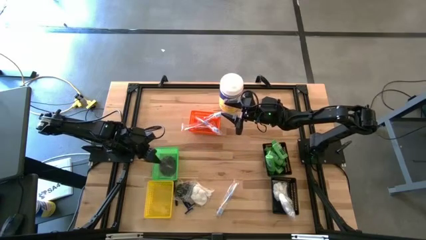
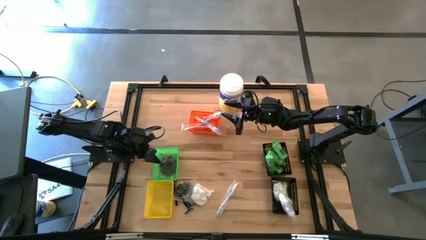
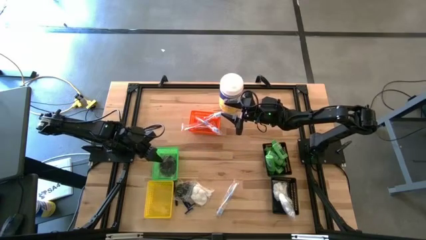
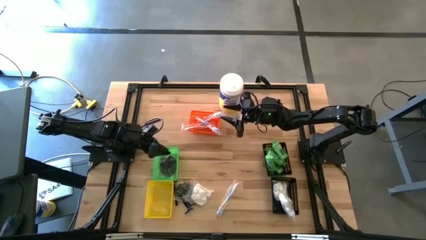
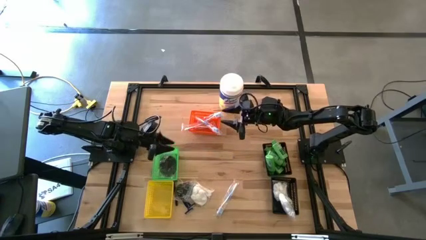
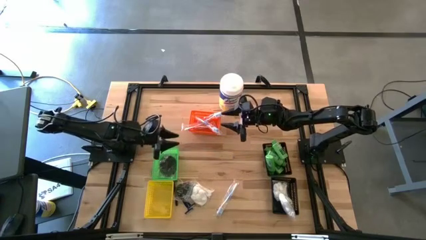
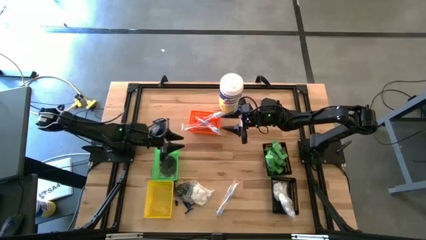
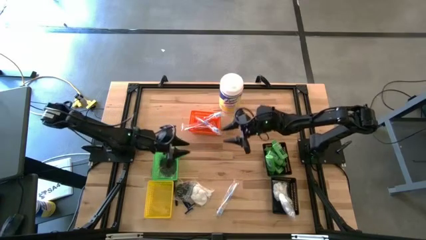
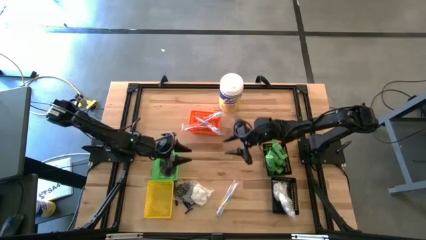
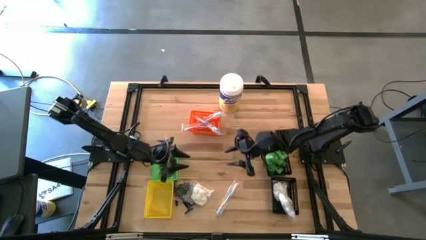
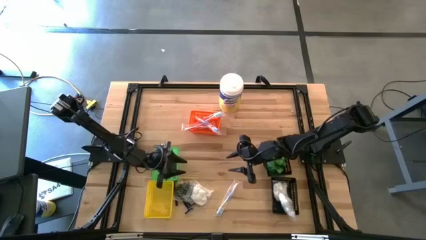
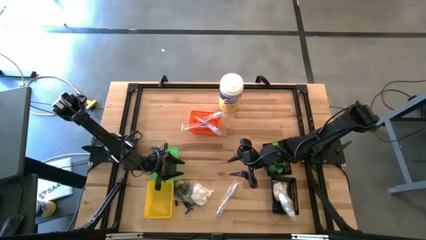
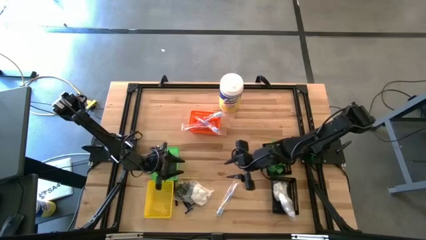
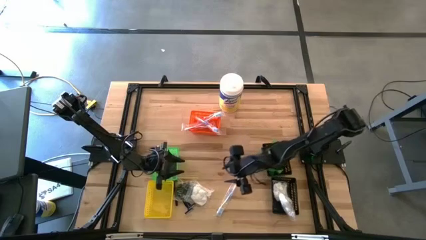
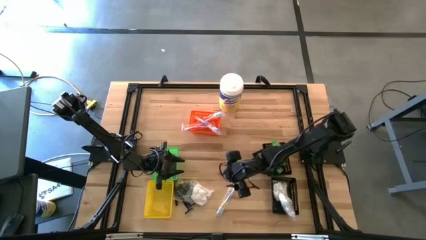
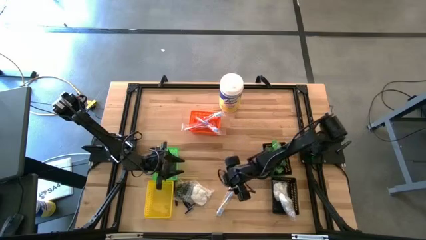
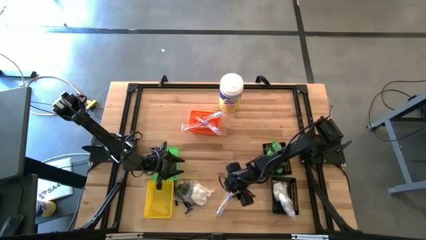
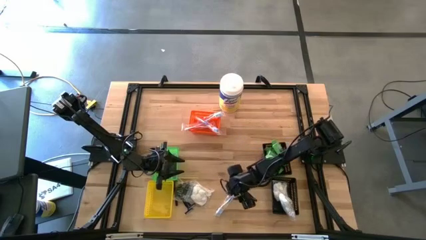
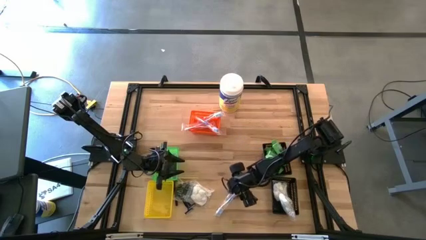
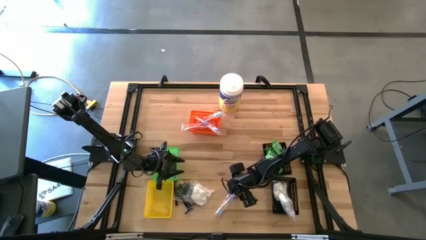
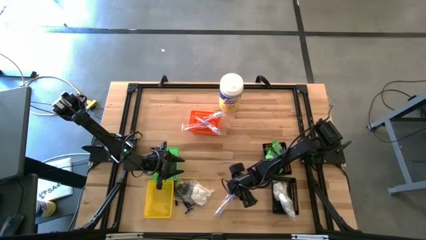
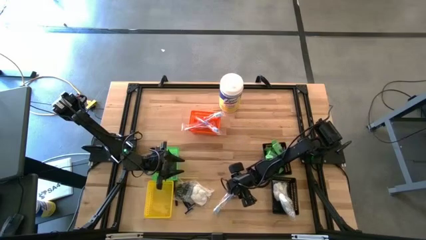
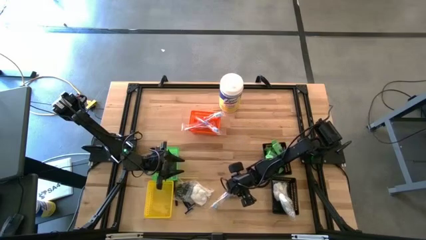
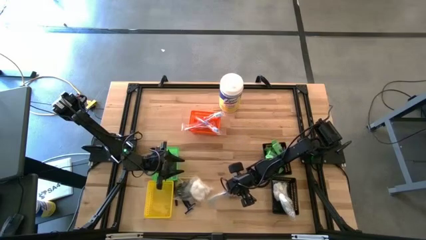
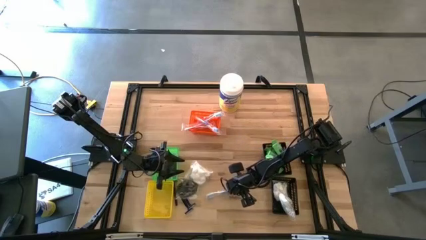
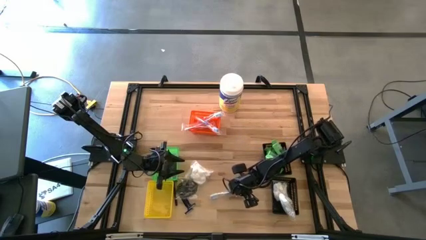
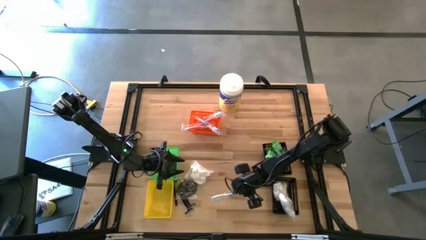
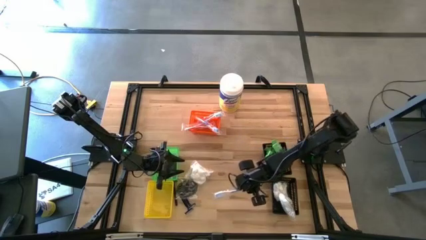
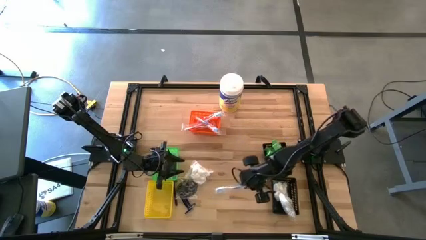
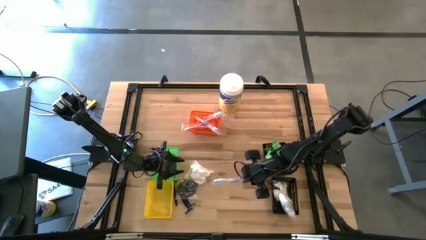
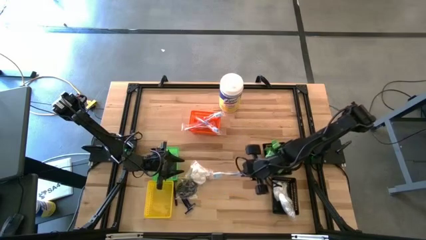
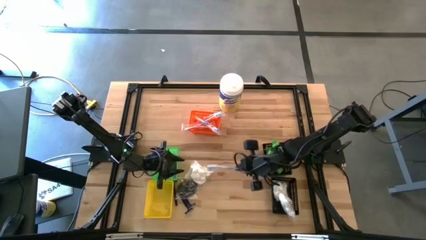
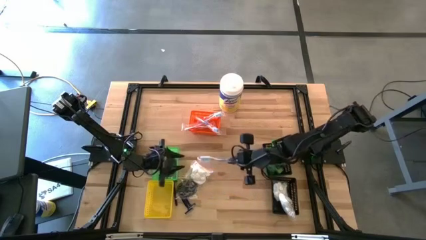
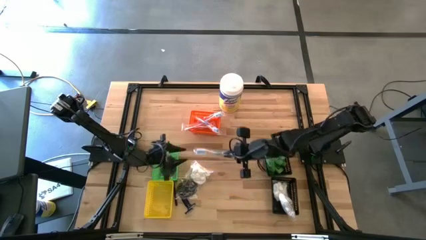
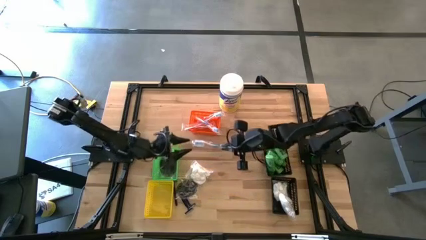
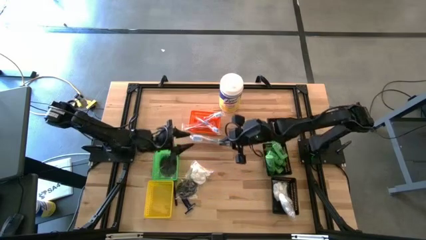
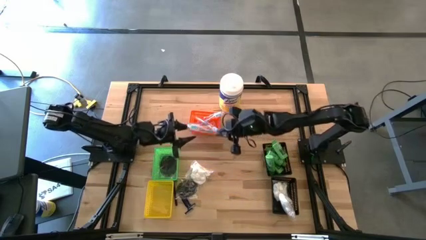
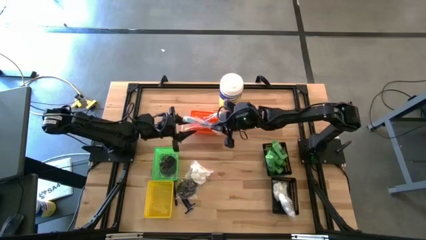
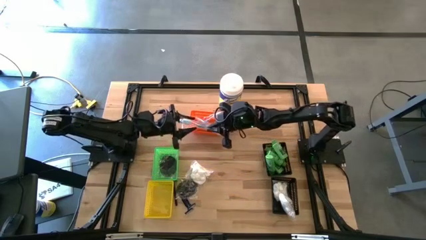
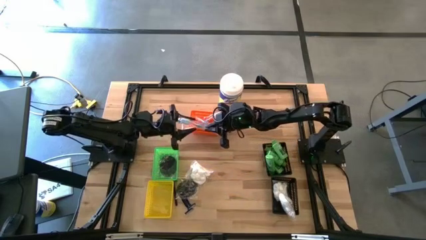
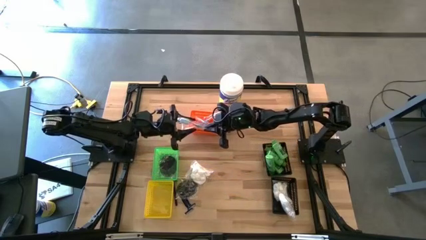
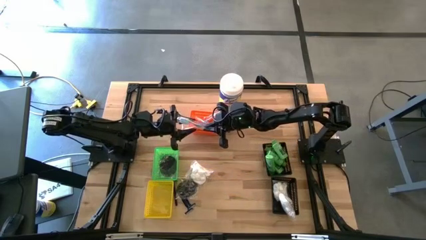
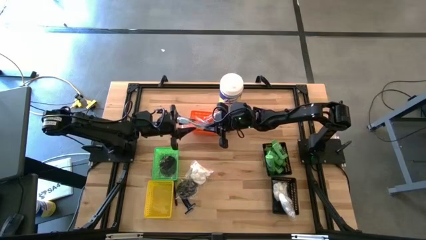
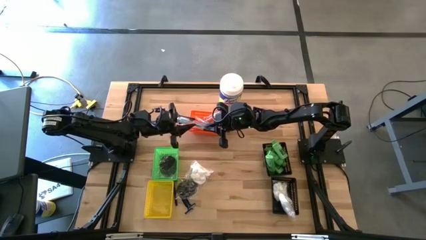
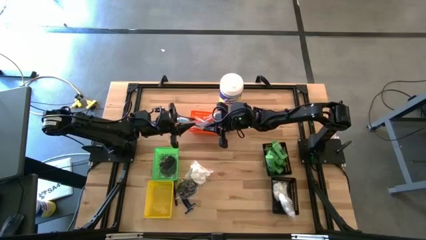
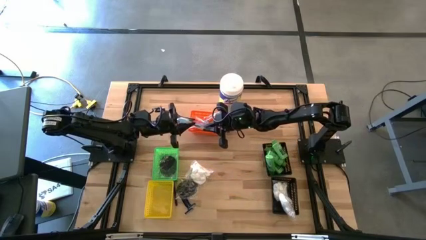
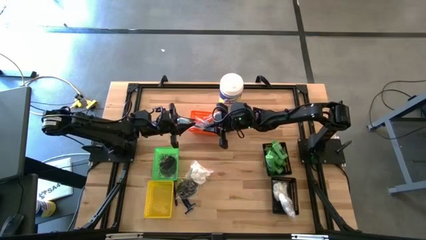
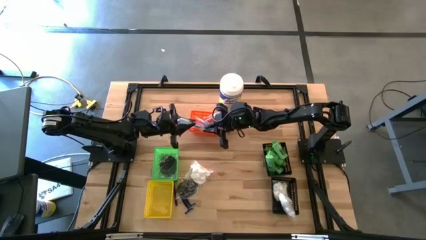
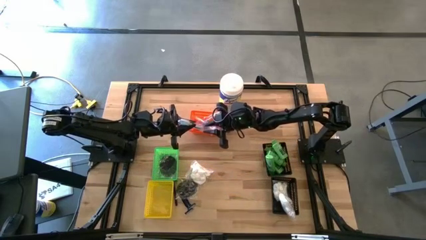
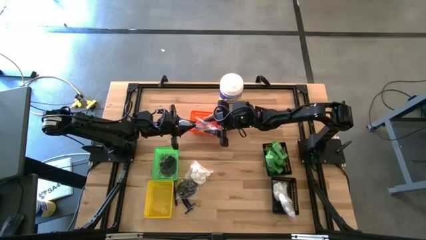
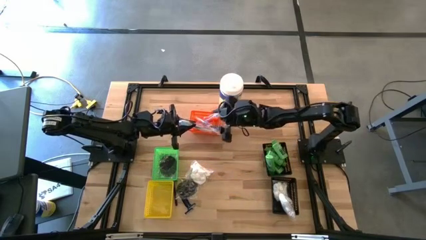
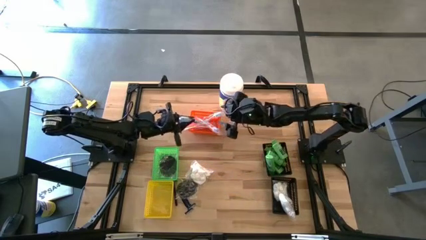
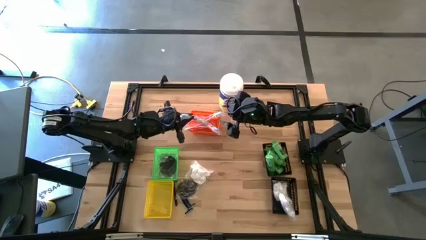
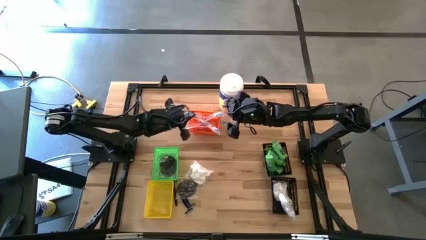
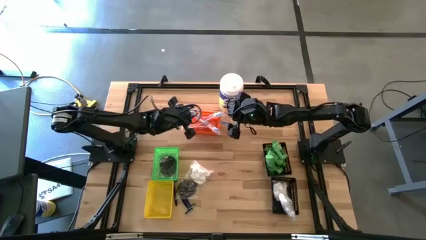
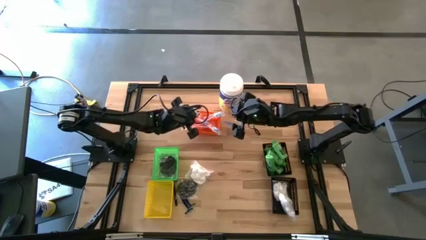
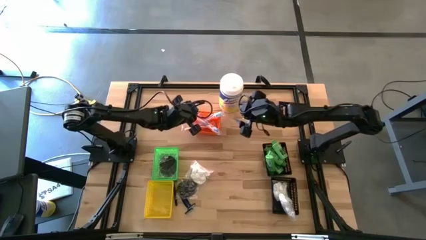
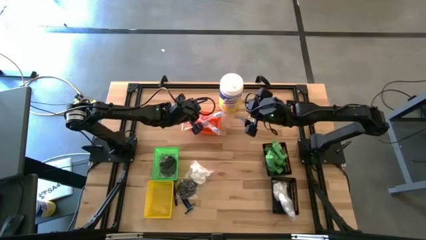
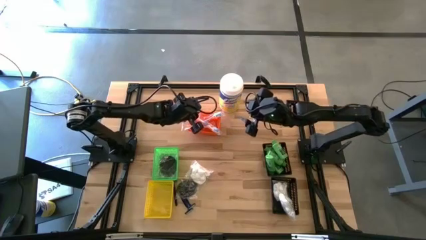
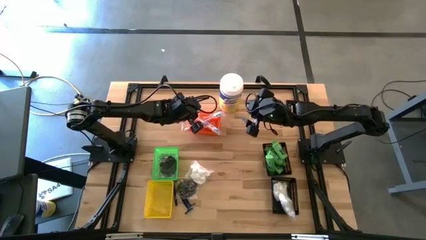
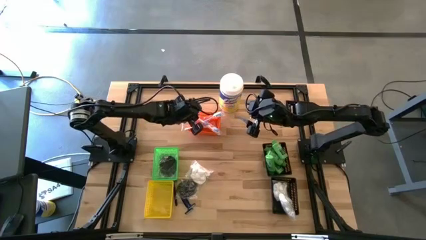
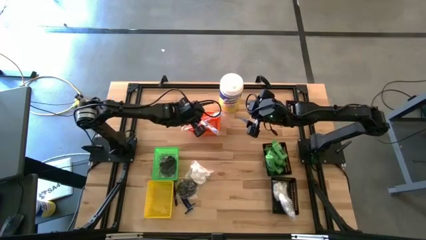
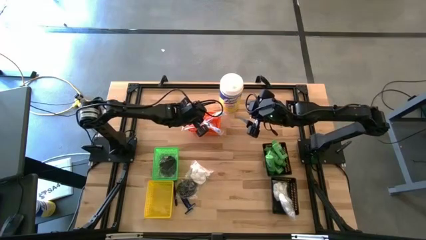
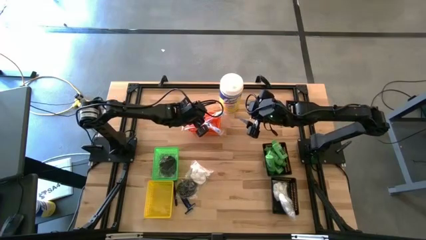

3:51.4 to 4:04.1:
Task: Pick & Place Travel size toiletries
Put the blue toothbrush into the orange bin

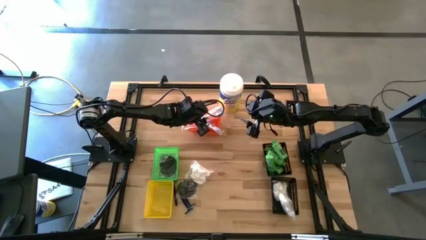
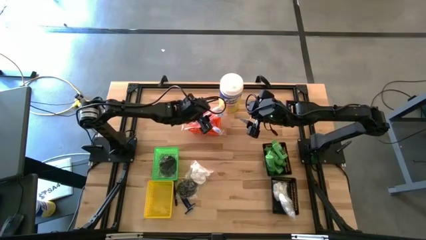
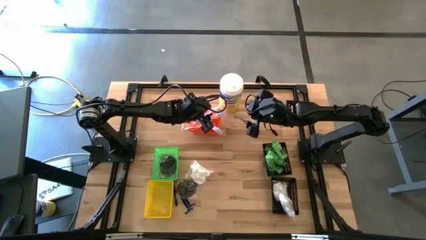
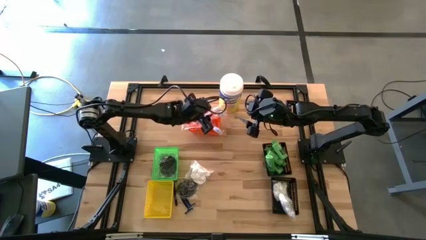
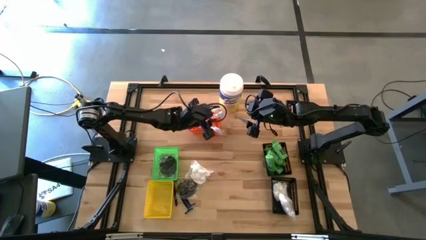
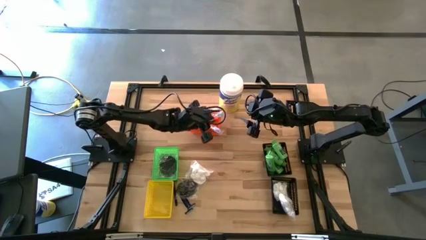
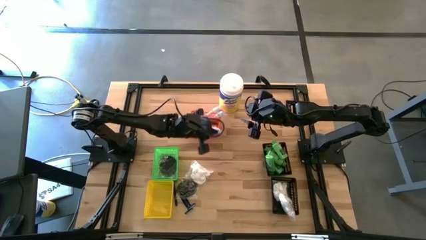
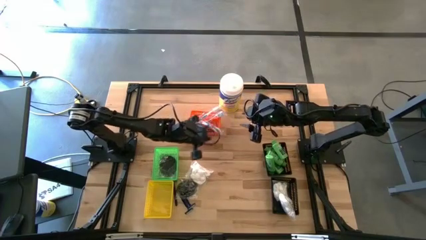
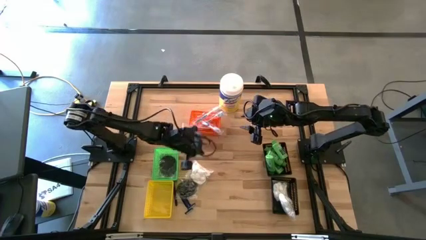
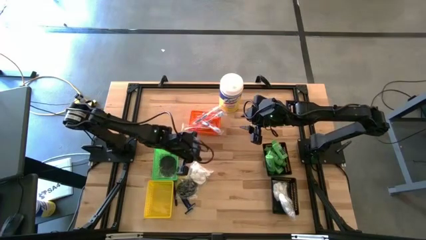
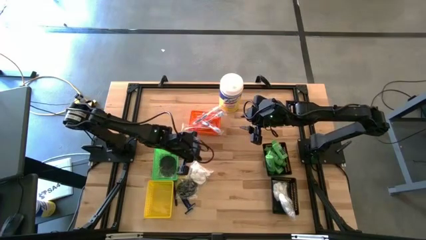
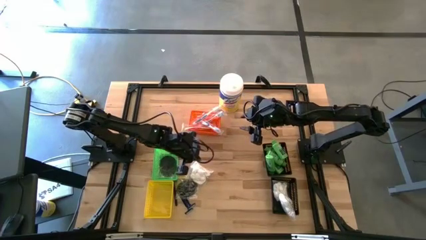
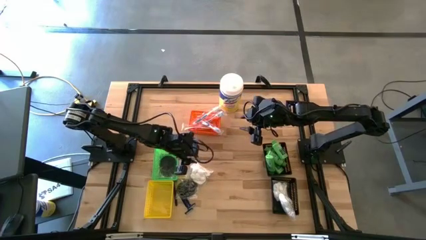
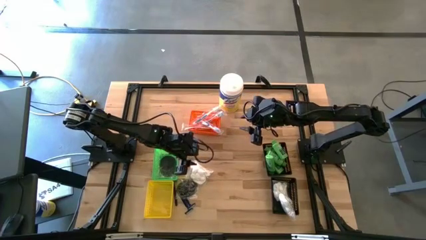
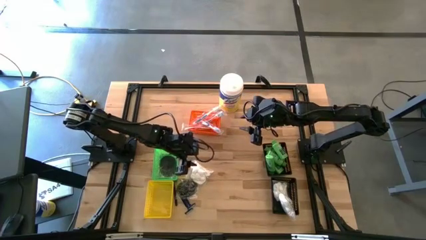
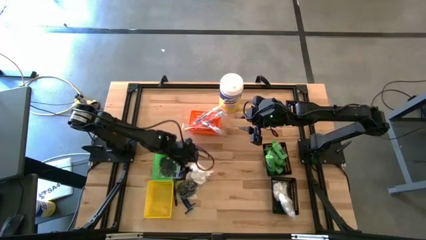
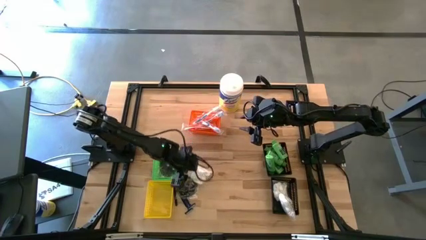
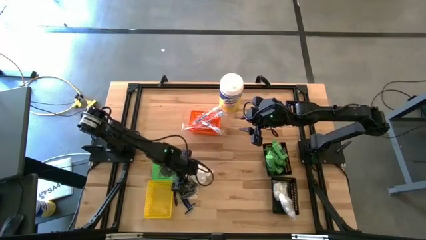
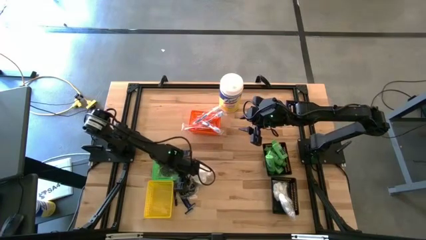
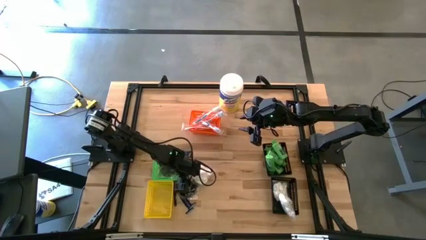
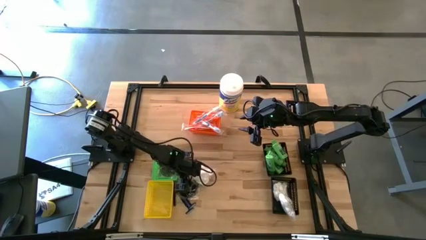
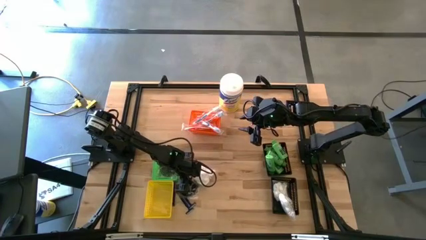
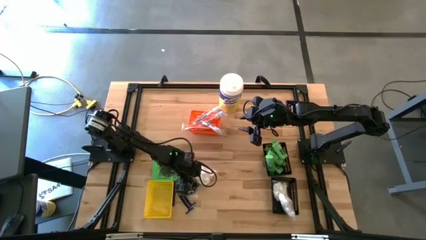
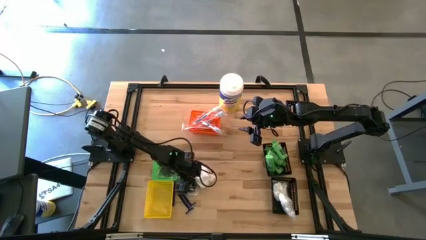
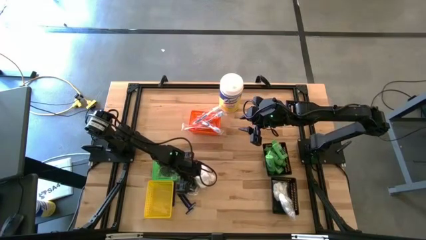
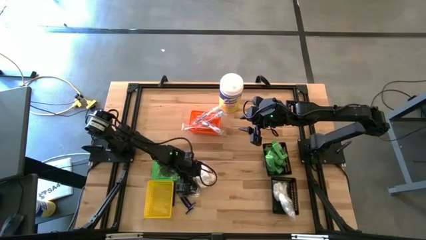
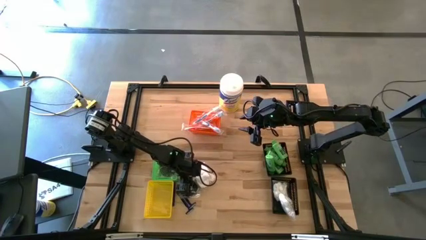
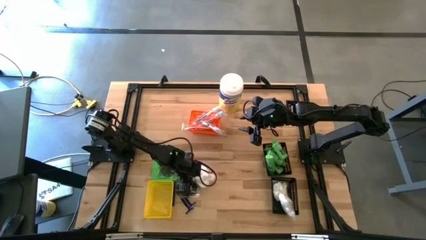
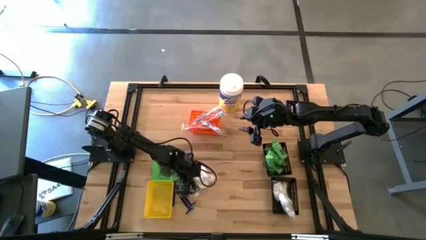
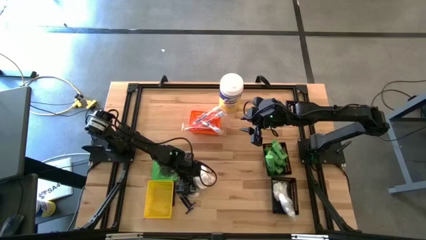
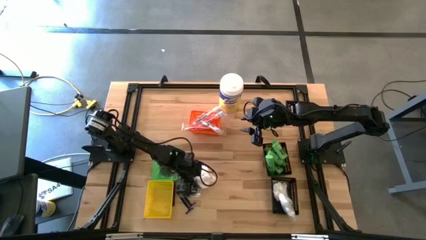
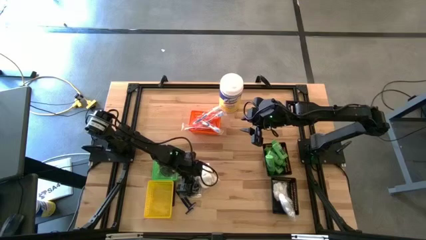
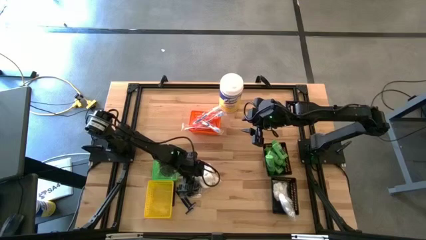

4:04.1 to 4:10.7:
Put the white cotton pack into the bottom black bin
